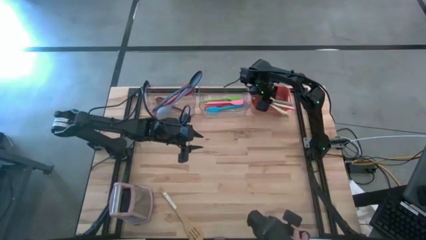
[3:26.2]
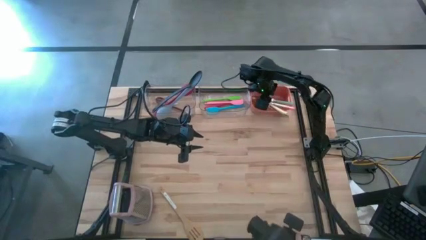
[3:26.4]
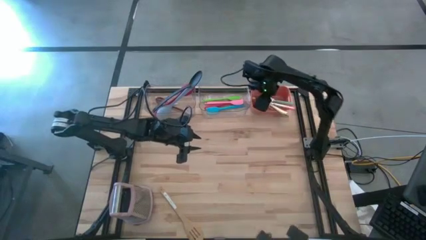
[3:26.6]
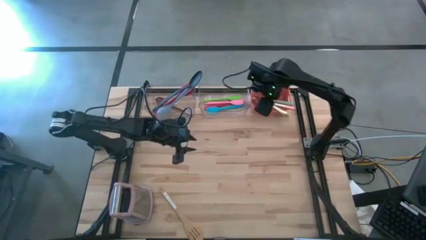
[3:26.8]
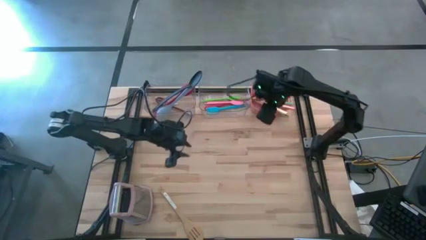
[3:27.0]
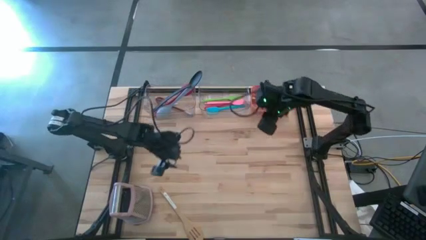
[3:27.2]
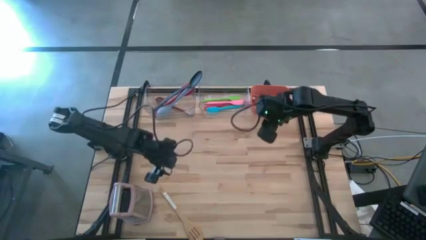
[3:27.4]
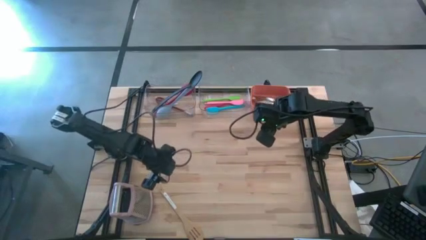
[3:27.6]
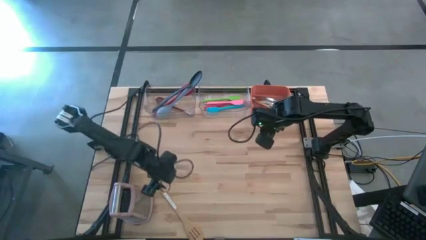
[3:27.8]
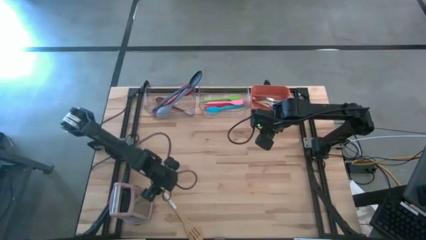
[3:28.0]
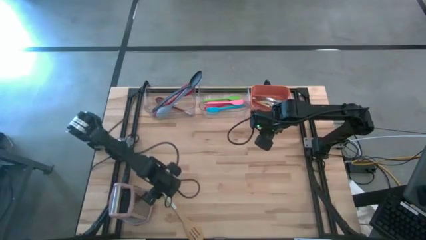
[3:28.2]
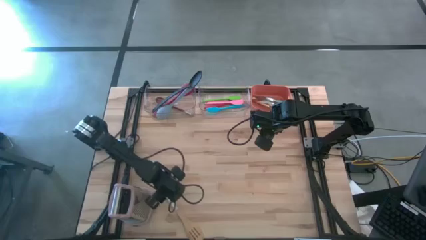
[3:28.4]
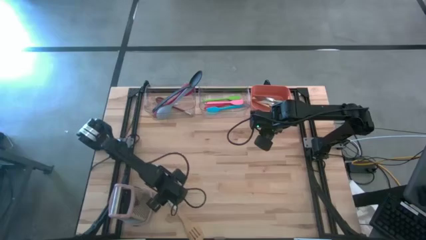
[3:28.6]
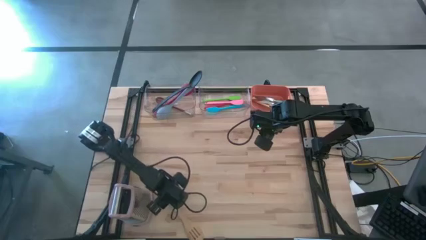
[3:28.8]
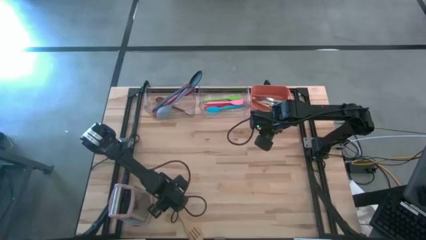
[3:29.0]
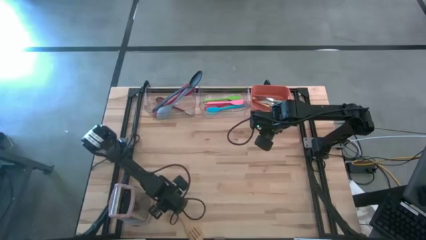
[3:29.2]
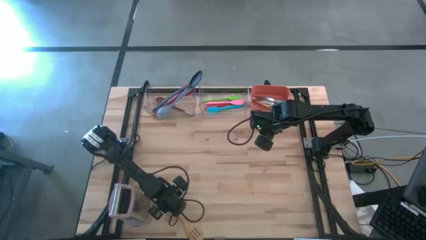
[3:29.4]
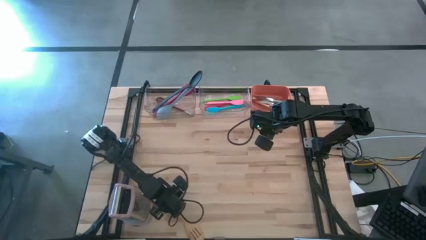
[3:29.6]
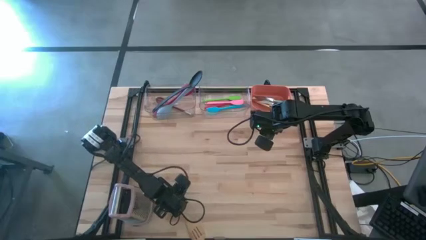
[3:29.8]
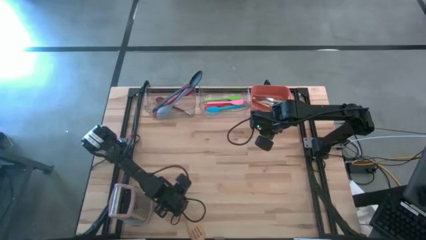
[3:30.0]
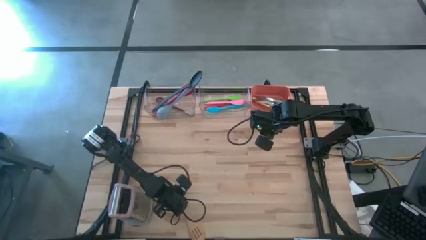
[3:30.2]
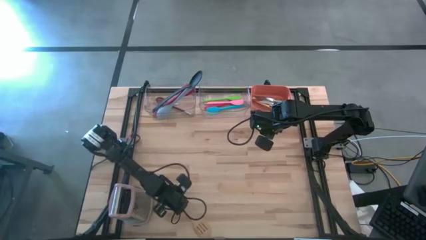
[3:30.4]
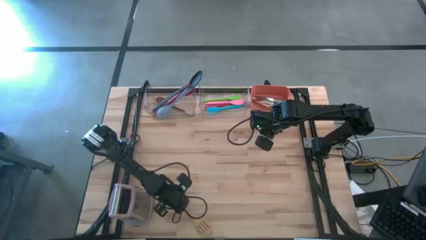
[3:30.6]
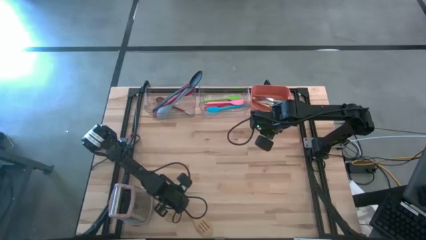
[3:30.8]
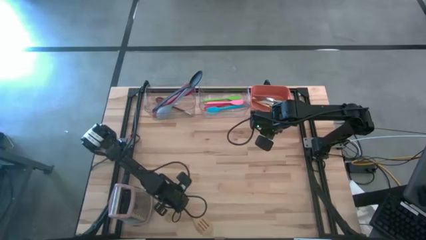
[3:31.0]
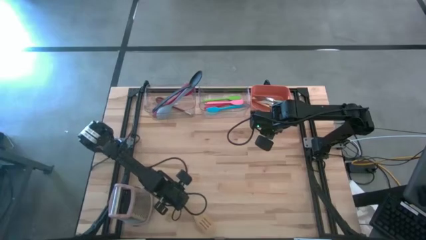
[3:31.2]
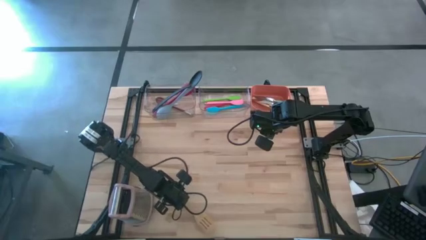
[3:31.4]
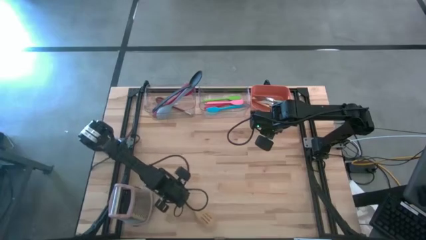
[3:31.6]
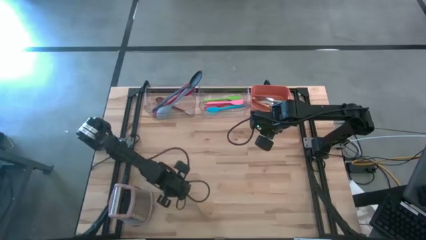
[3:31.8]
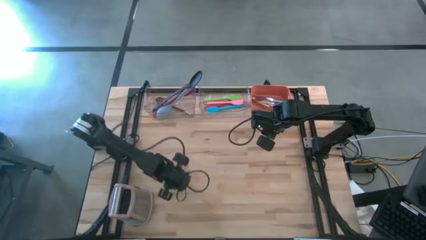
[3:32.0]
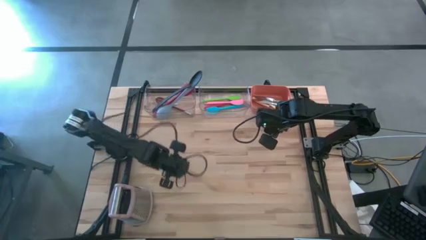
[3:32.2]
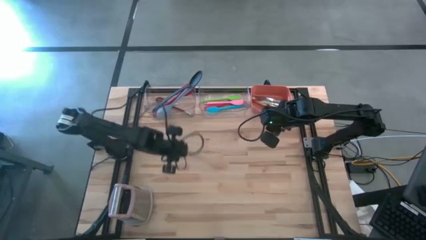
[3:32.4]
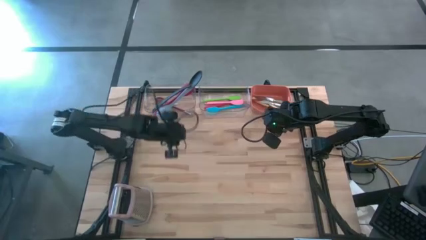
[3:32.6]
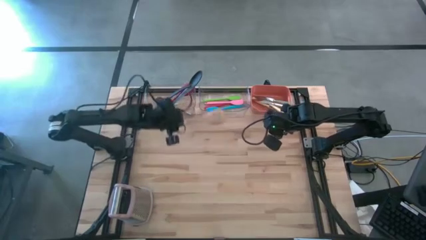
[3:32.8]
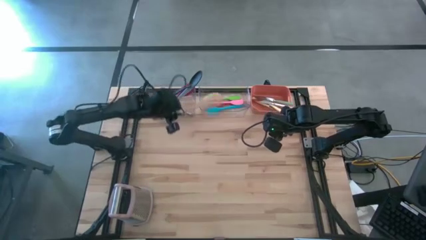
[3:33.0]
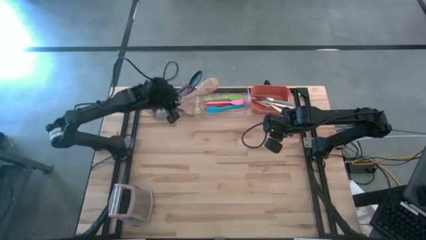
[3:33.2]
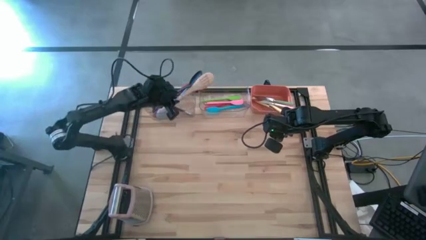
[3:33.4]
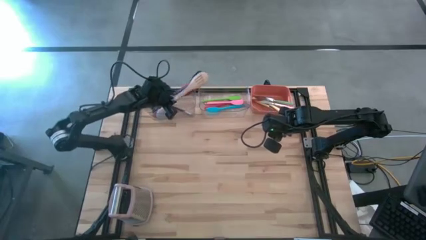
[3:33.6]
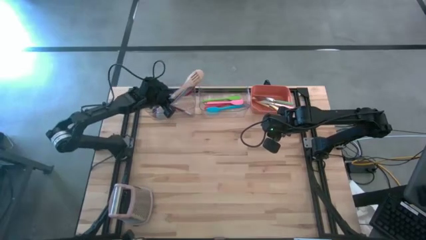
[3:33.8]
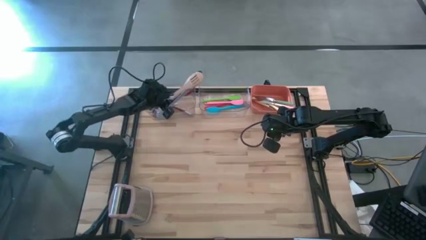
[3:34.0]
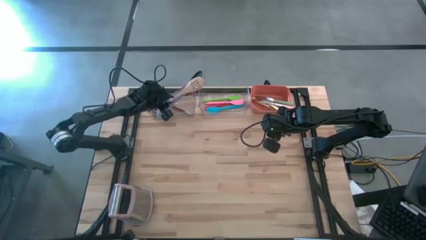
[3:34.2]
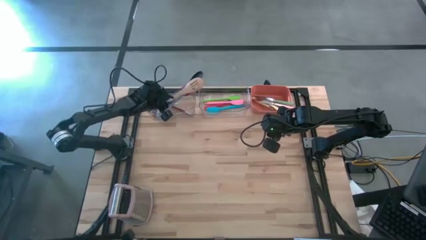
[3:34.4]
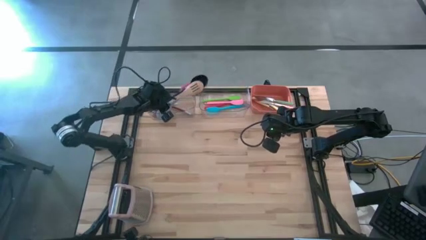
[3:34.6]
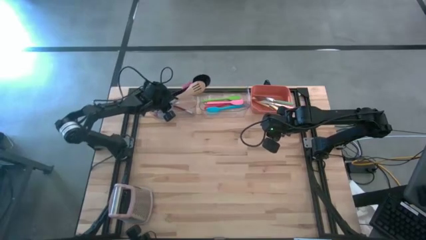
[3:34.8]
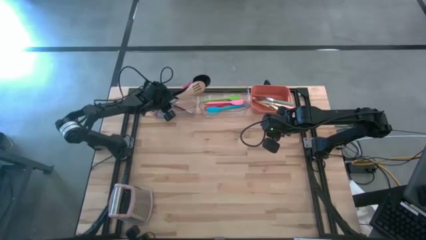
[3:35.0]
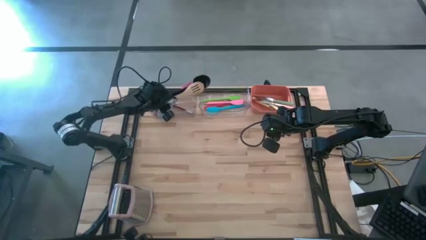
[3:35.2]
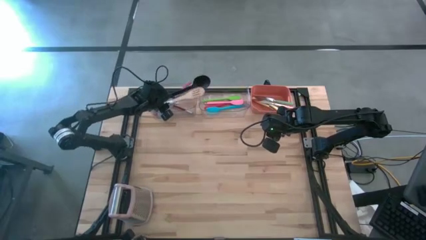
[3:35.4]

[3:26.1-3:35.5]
Task: Pick & Place Kitchen Items
Put the brown slotted spoon into the left transparent bin

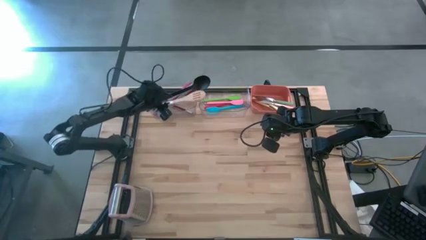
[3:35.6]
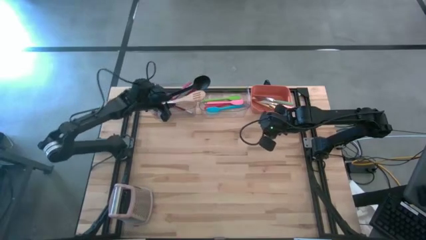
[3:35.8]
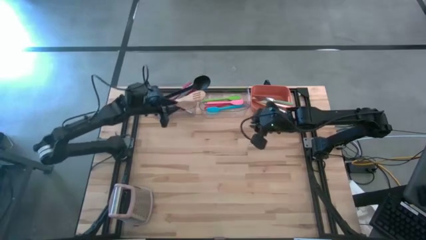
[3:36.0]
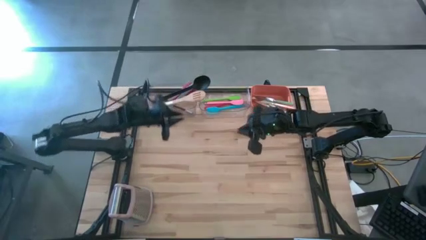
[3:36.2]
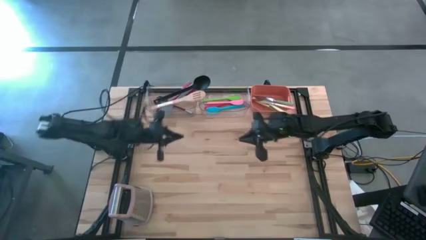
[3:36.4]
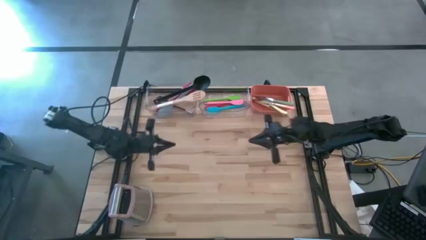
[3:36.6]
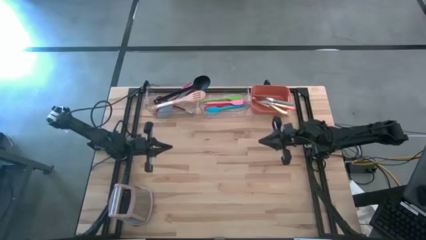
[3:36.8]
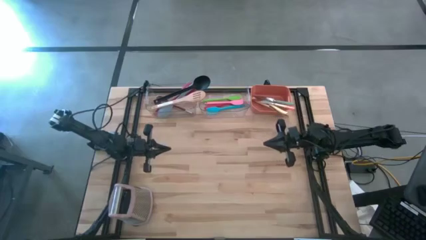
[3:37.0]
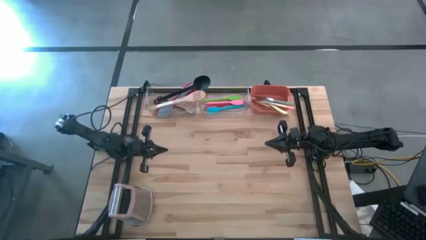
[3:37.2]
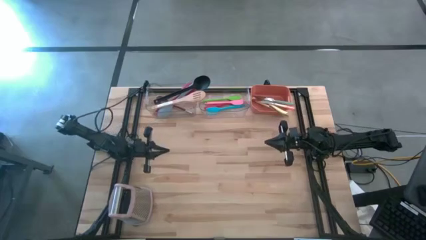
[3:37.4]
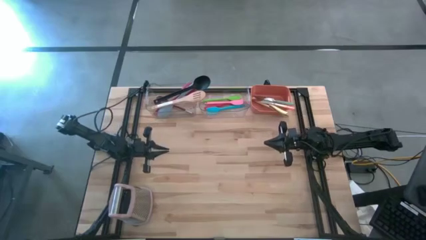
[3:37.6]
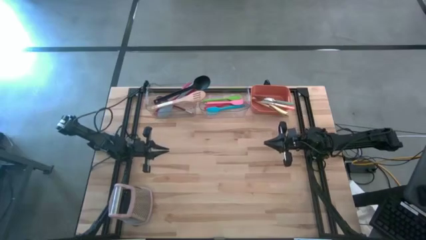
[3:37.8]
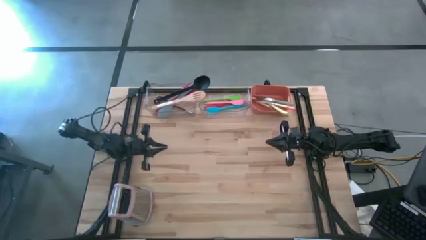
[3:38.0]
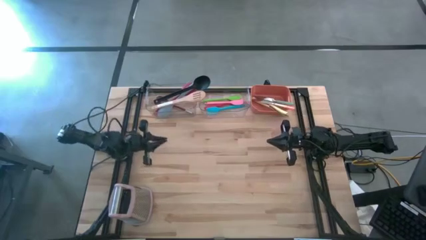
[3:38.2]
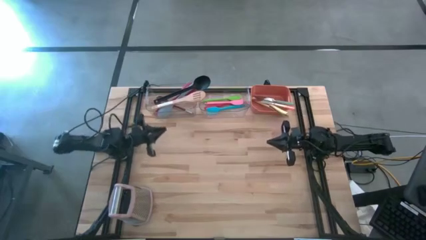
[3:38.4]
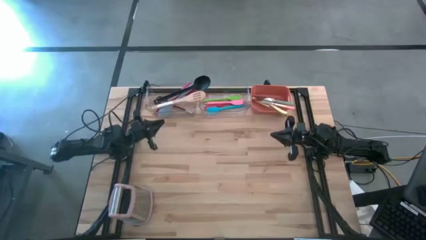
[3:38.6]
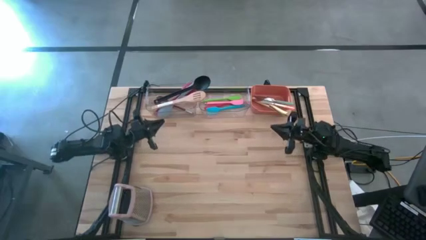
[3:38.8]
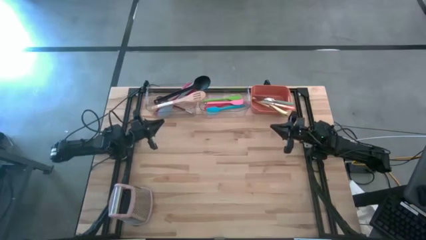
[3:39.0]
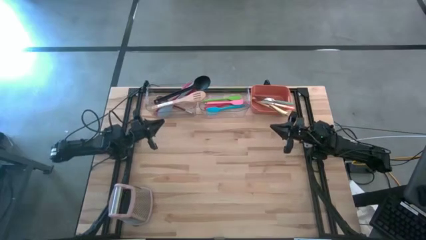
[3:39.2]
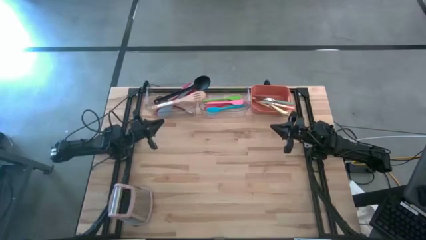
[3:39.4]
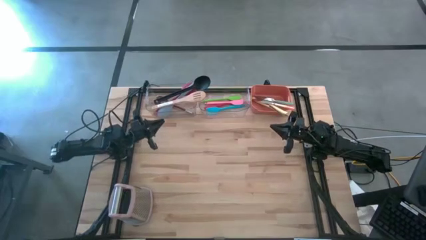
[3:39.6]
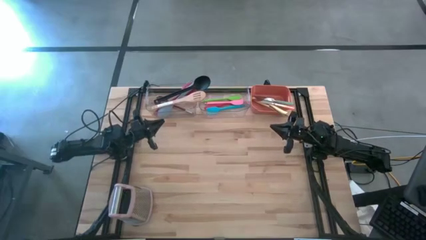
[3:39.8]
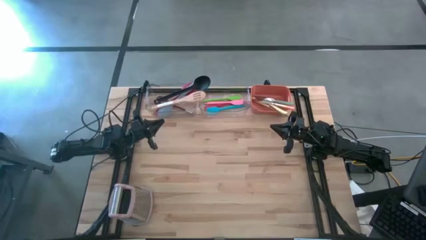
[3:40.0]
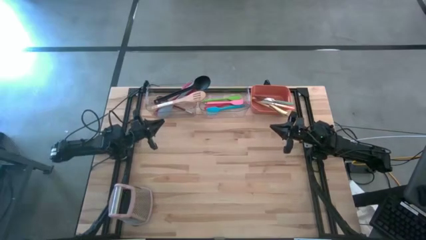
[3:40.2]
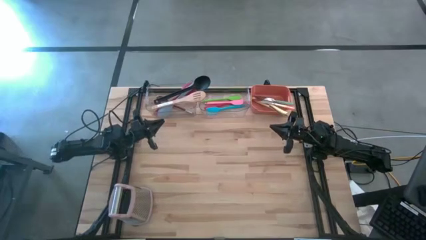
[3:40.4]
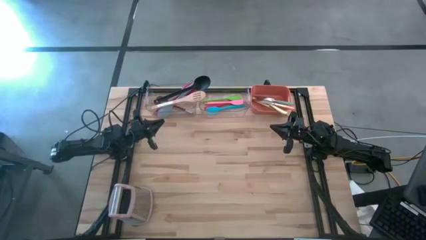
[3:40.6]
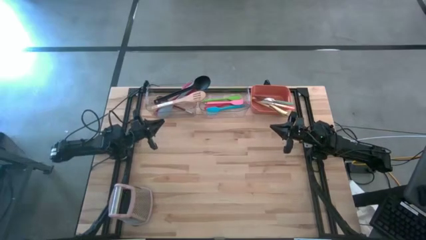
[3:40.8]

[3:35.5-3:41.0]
Return to Home Position
